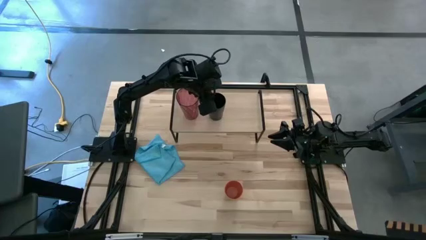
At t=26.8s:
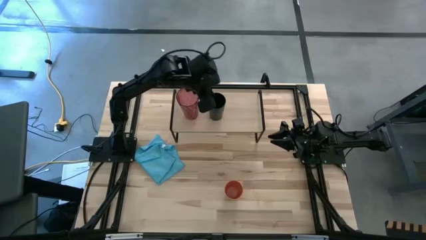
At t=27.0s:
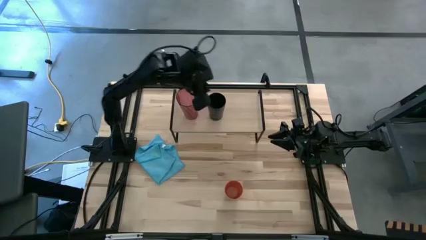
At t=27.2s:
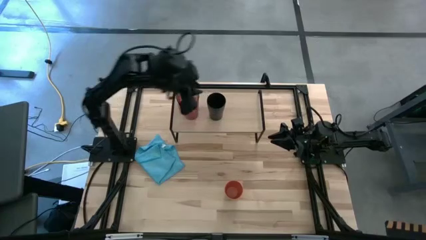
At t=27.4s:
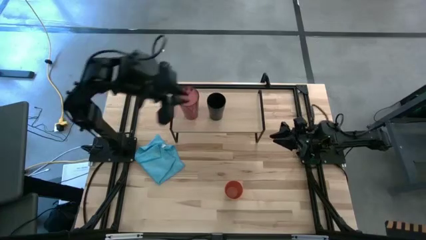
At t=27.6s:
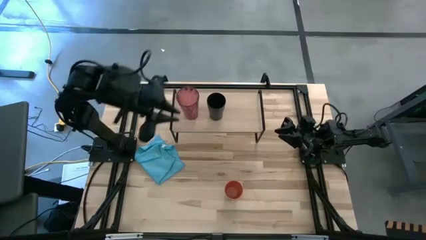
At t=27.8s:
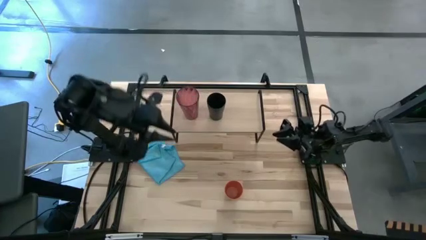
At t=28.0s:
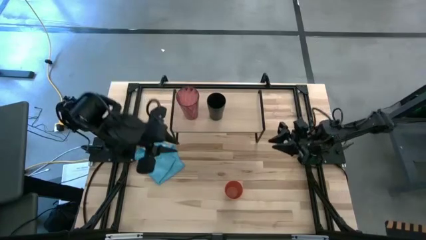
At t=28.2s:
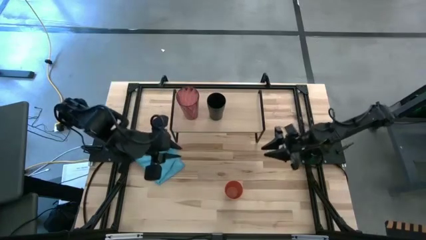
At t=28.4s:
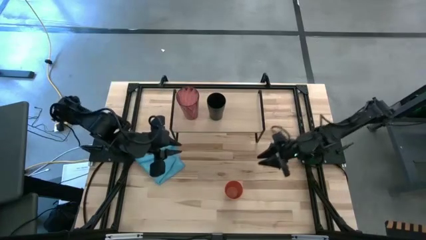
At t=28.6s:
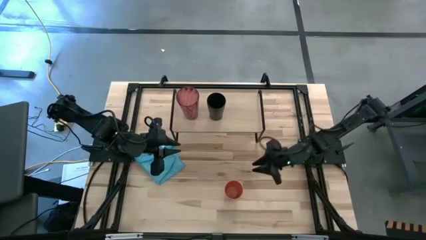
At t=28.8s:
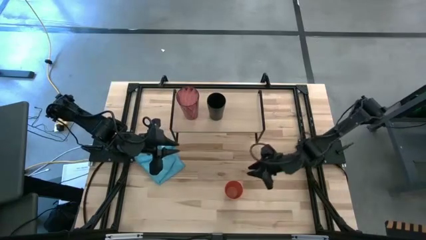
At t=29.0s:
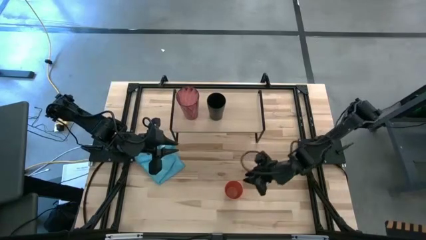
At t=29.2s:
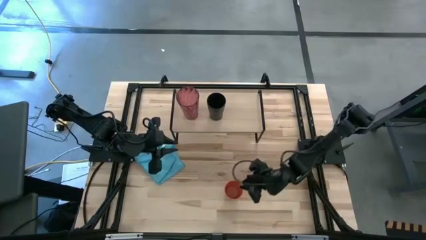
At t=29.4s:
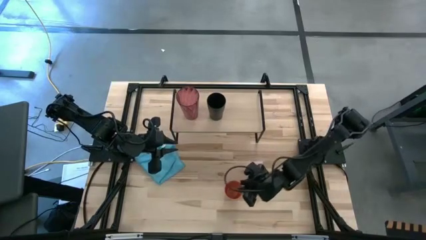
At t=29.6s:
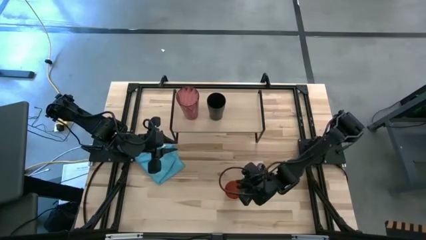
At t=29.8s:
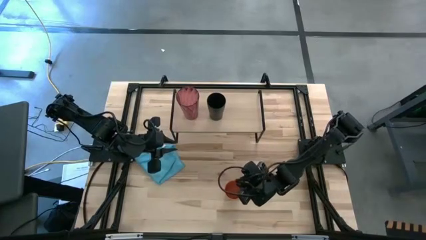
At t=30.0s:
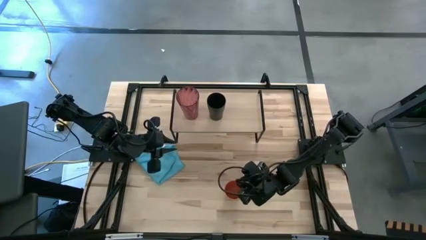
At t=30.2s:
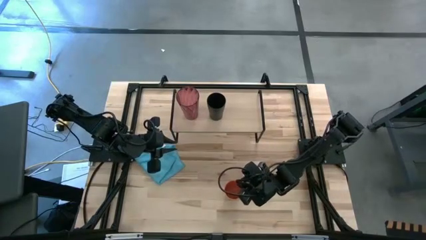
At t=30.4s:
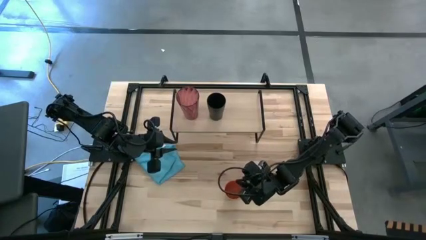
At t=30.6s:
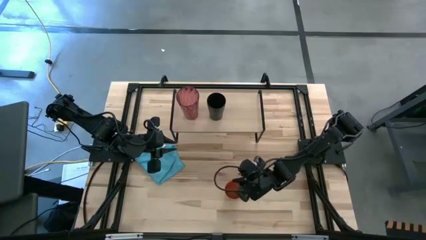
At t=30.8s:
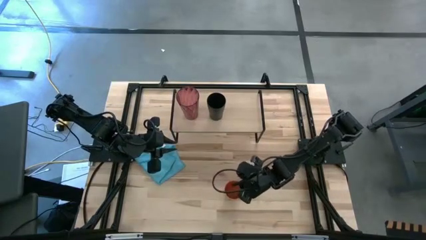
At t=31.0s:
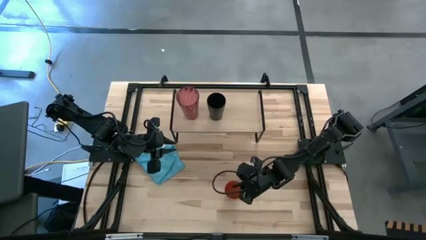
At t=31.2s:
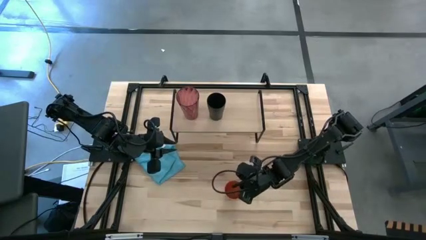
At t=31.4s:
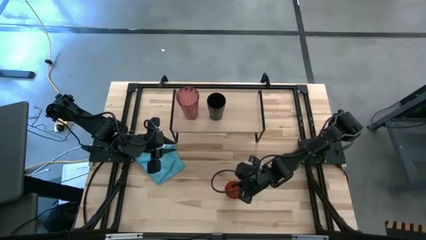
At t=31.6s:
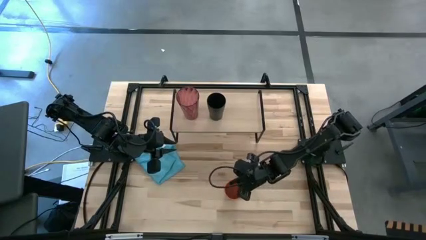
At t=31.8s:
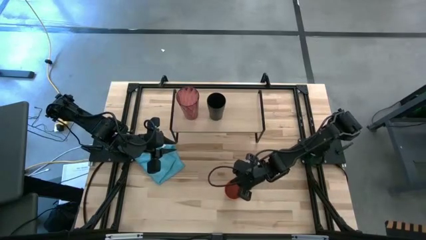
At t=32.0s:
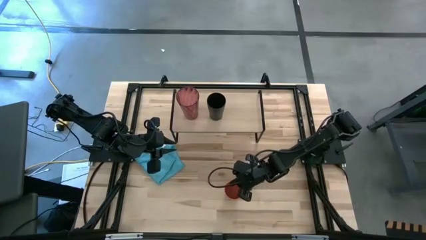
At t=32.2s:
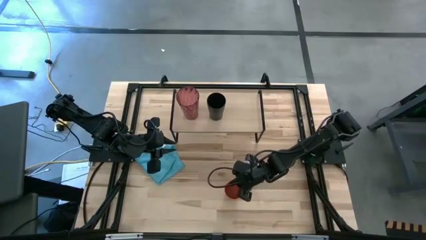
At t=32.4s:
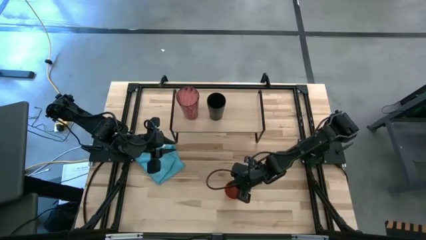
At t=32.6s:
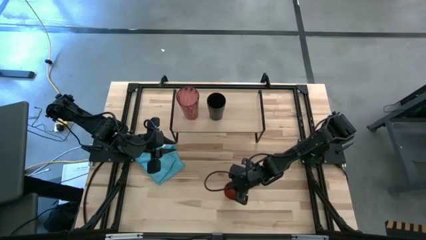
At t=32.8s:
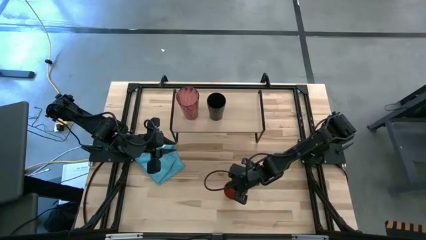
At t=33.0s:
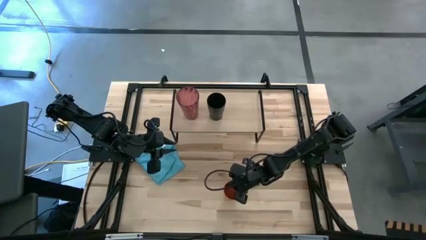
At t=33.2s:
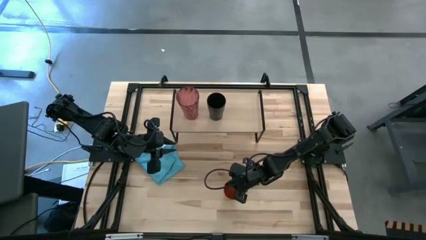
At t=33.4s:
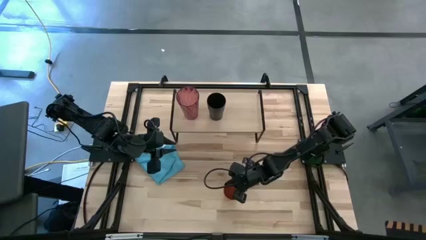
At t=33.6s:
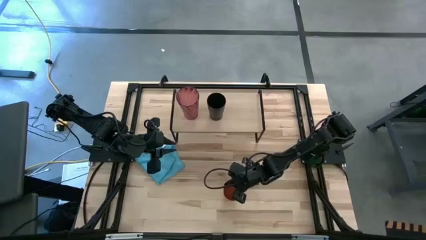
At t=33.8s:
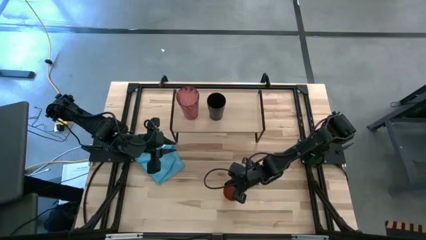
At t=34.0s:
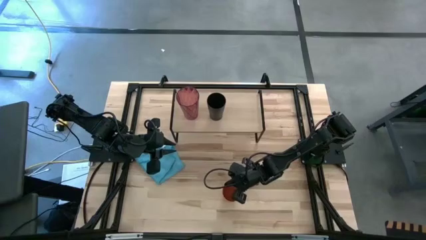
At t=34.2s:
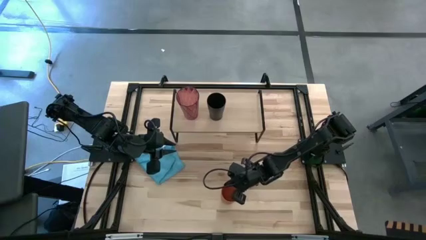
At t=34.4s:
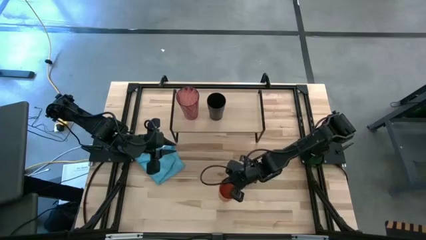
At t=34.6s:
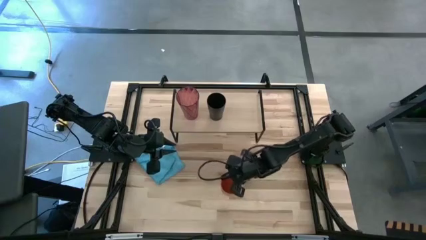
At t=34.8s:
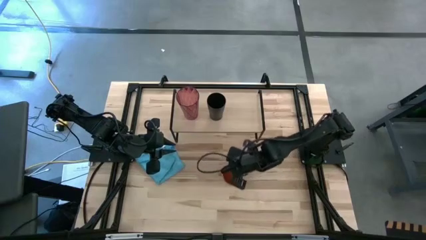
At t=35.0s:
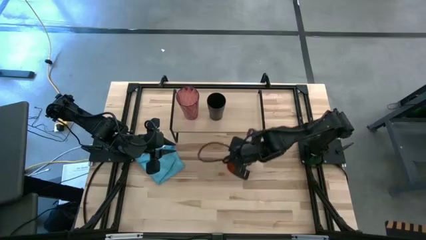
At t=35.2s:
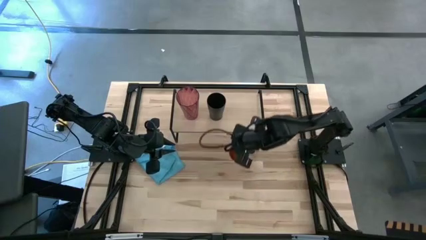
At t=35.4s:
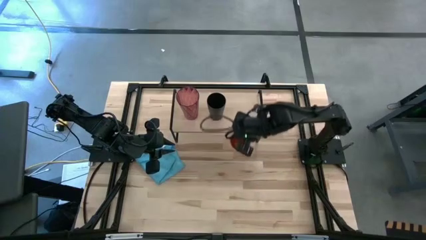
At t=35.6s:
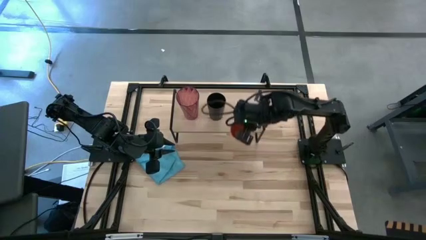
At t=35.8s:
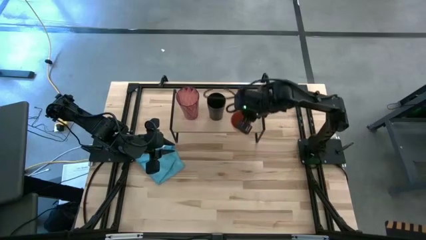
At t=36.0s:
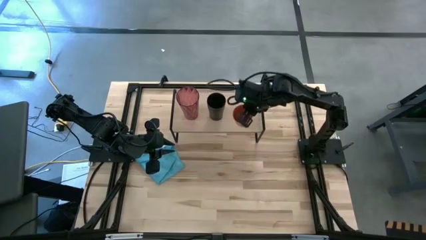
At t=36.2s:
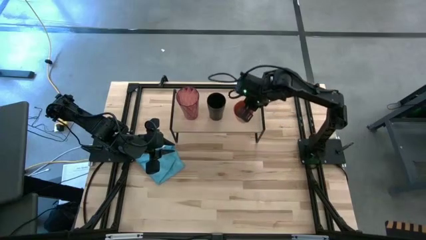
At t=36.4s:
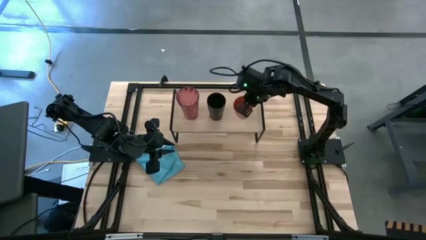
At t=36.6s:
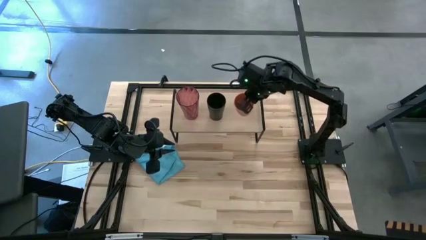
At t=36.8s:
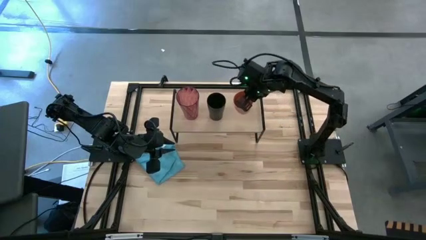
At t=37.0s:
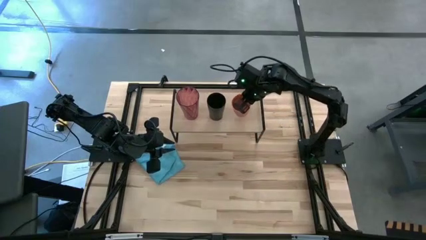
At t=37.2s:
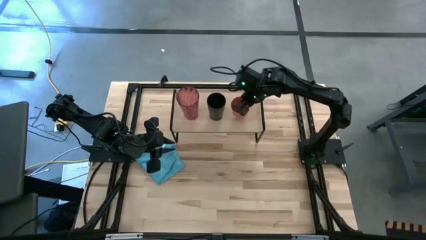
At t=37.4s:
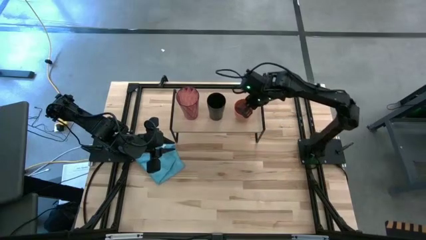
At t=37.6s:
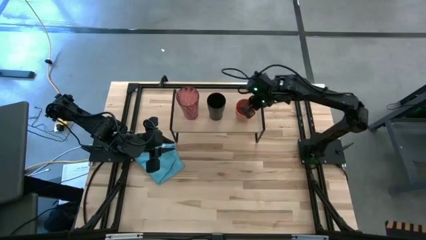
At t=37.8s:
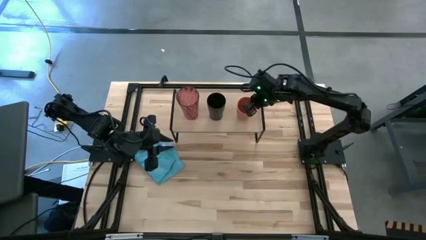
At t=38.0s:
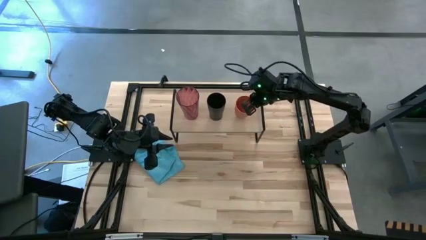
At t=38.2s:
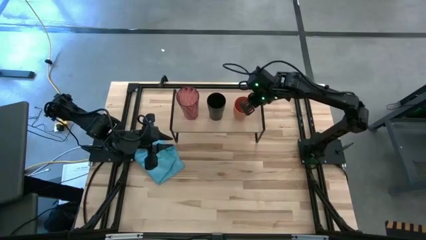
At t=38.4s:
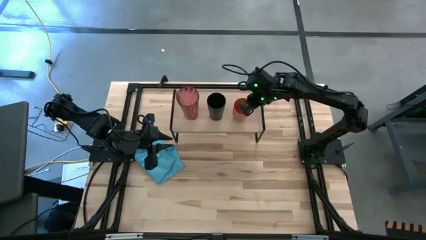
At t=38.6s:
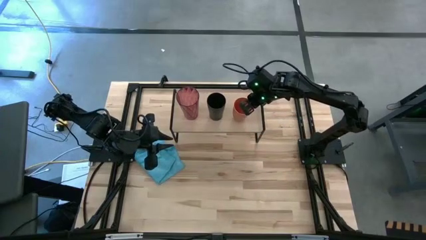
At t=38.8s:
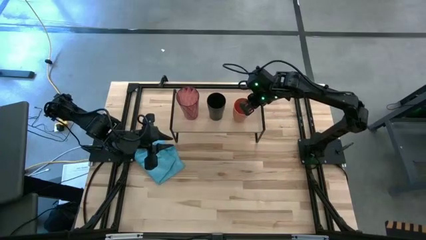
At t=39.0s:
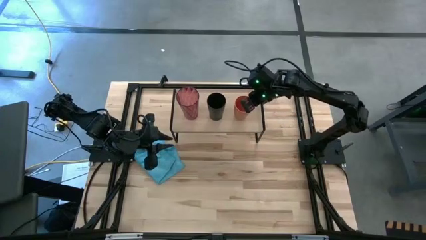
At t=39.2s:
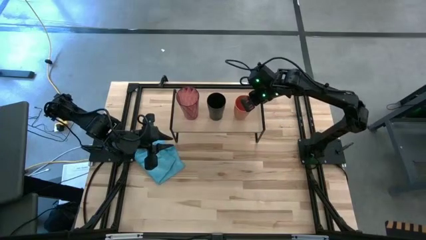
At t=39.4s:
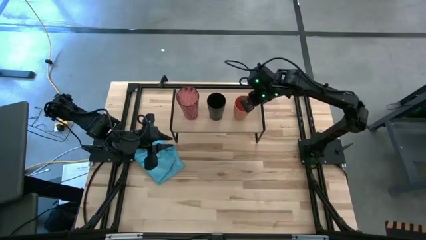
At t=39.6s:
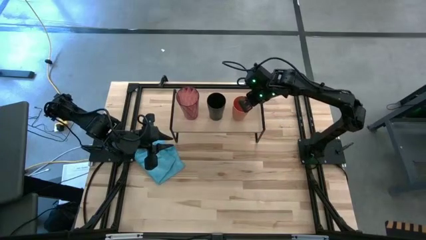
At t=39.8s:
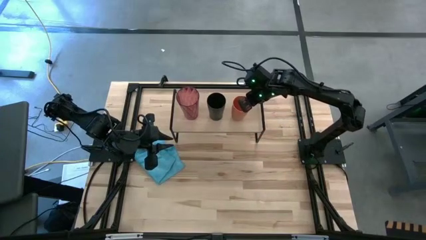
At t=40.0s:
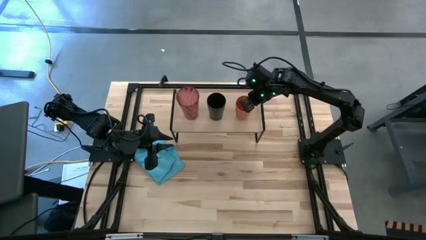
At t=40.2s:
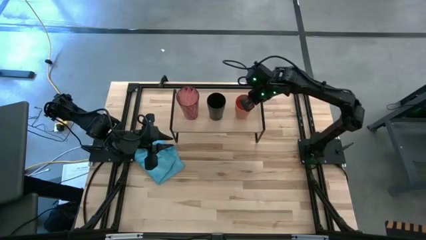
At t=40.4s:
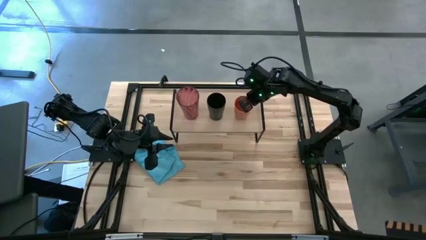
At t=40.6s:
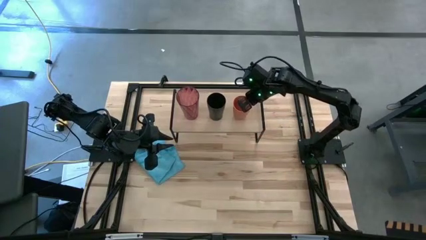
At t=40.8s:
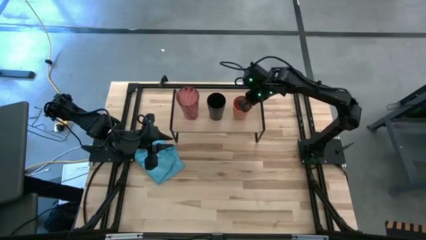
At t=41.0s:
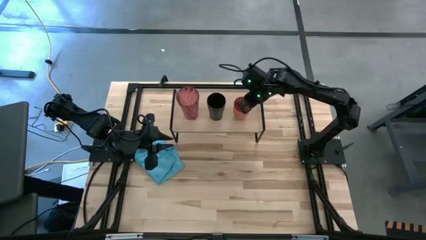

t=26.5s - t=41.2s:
Task: Stack small to large cups/mugs on shelf
Put the orange cup on the shelf
